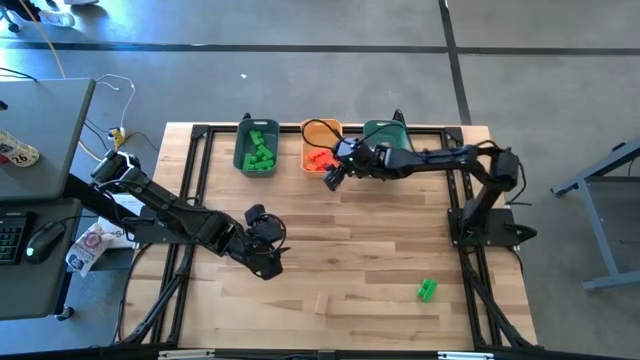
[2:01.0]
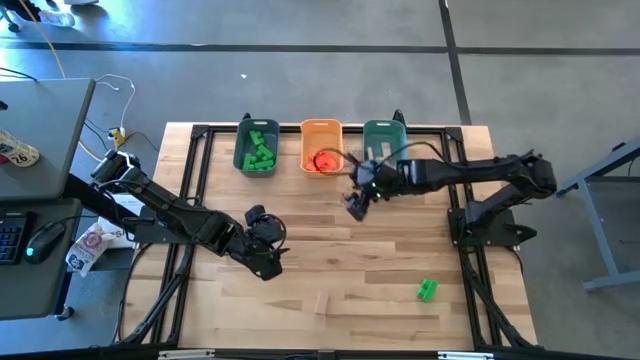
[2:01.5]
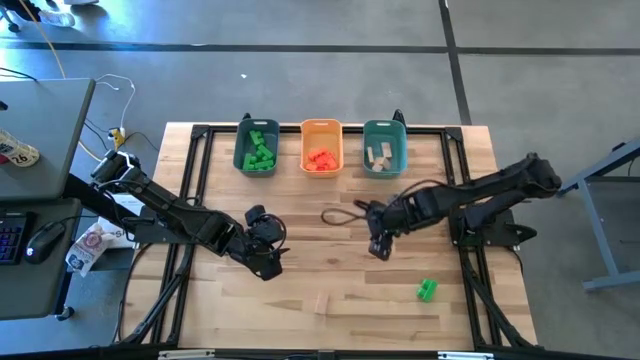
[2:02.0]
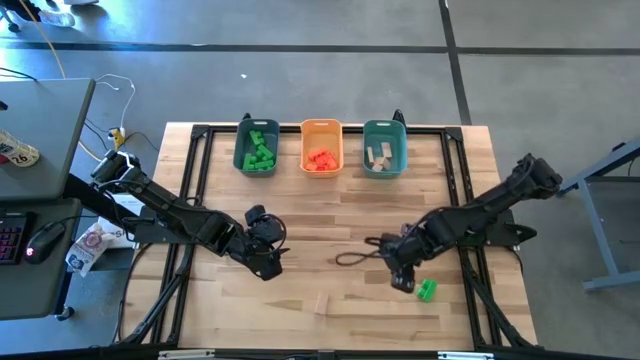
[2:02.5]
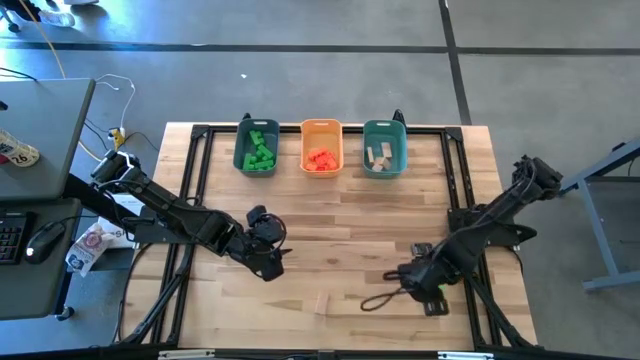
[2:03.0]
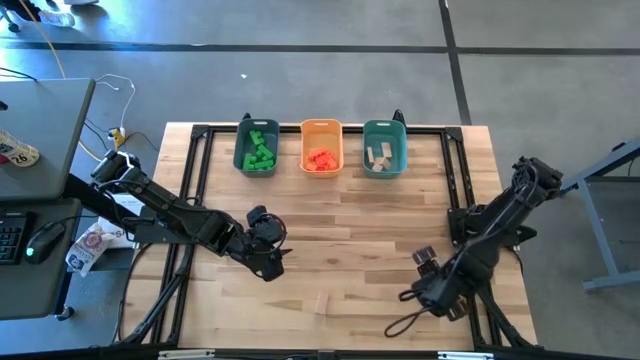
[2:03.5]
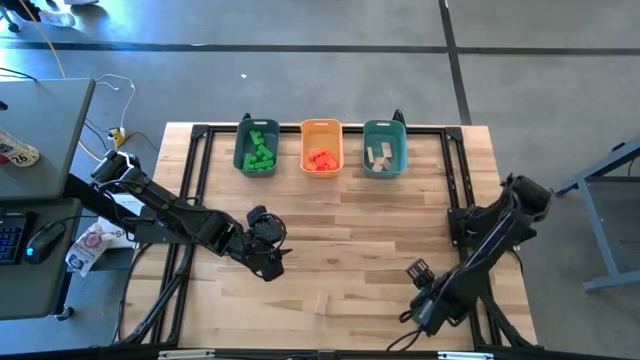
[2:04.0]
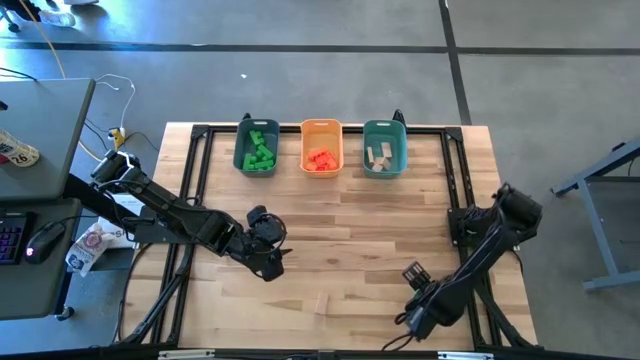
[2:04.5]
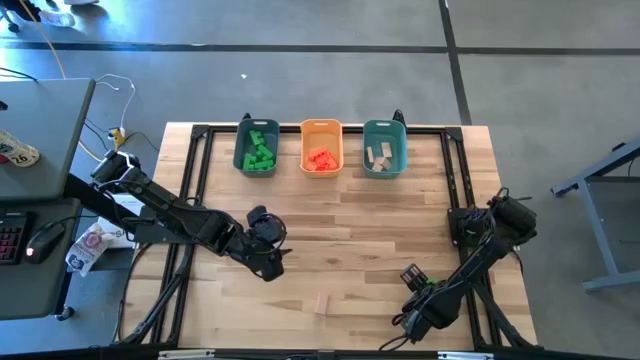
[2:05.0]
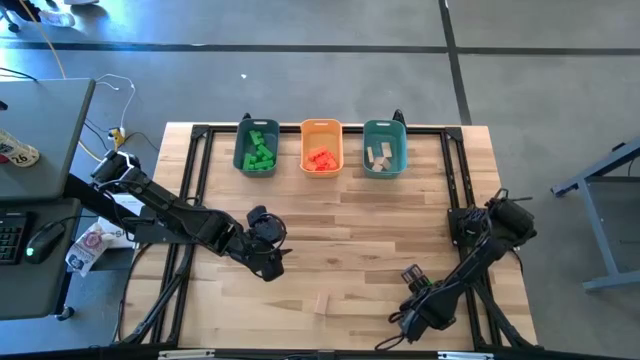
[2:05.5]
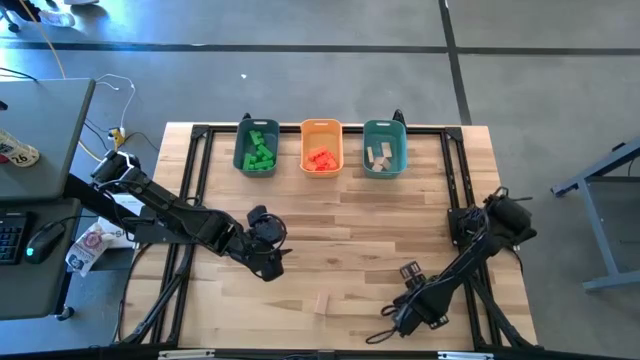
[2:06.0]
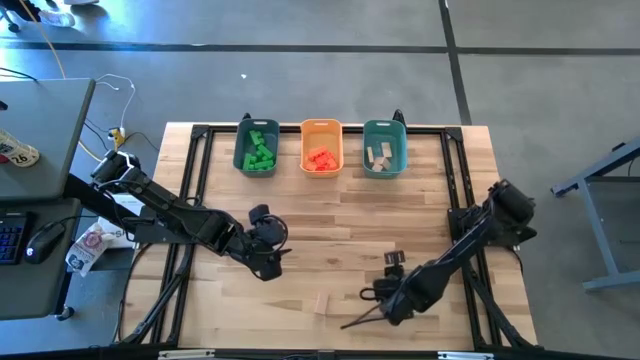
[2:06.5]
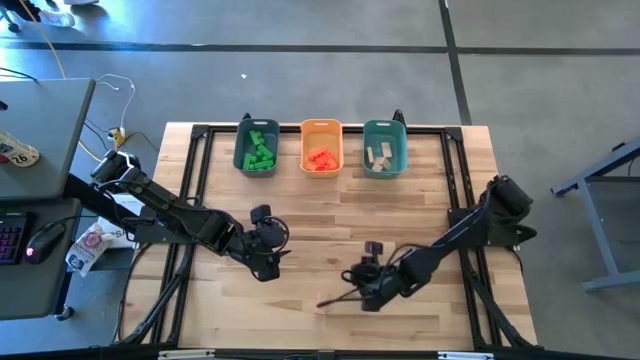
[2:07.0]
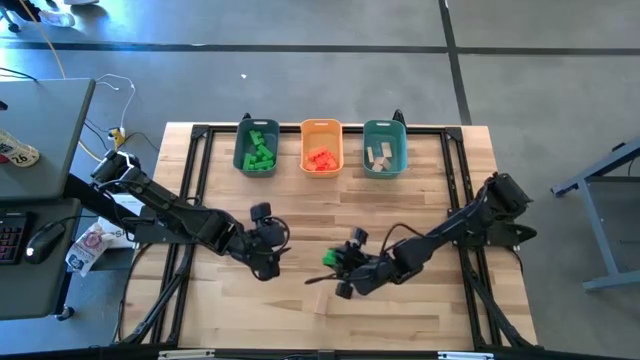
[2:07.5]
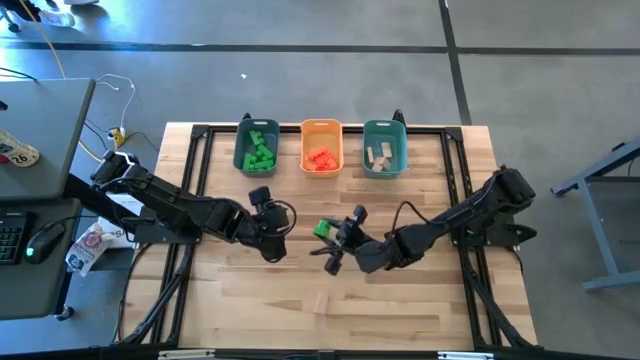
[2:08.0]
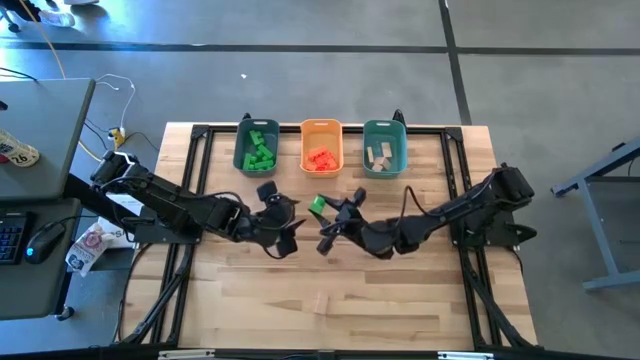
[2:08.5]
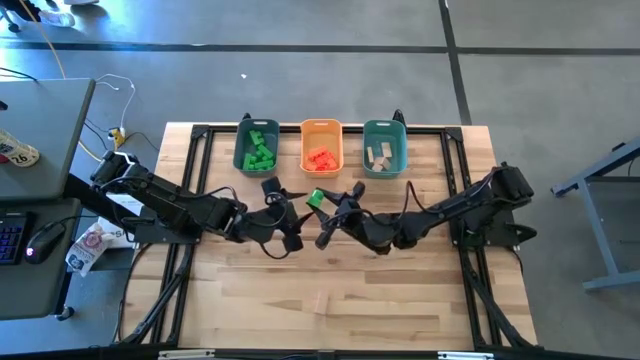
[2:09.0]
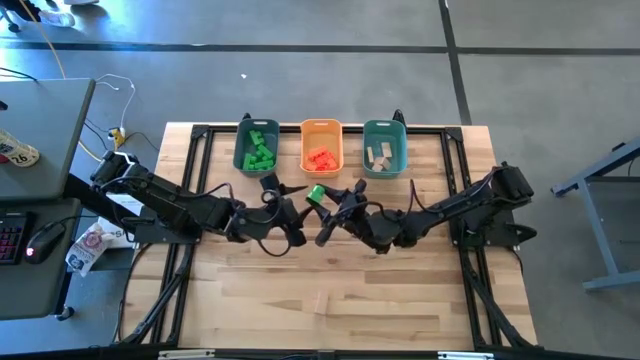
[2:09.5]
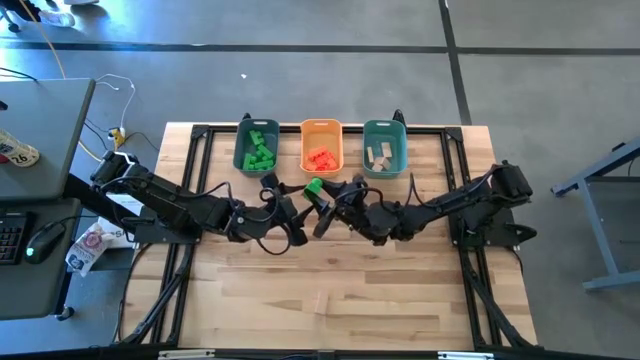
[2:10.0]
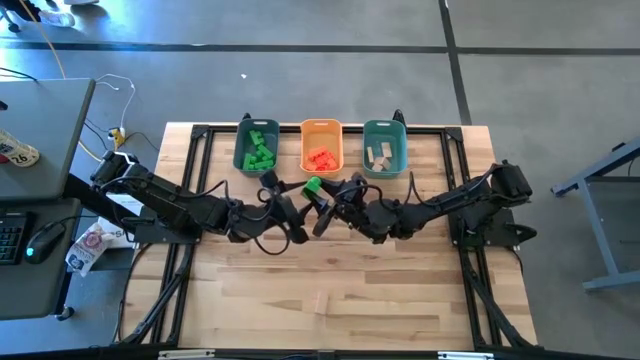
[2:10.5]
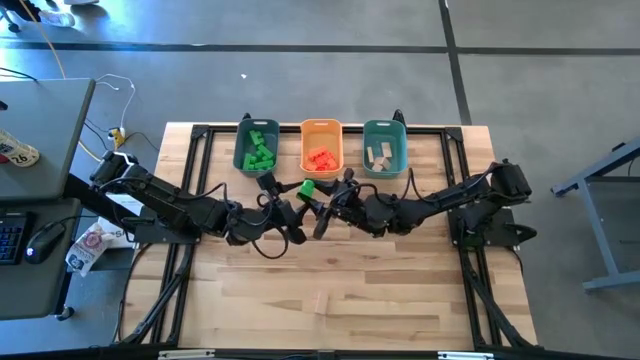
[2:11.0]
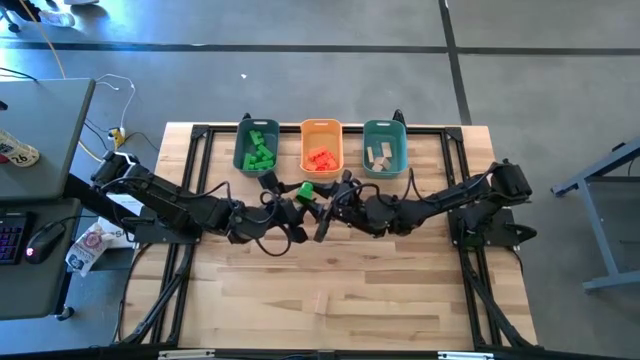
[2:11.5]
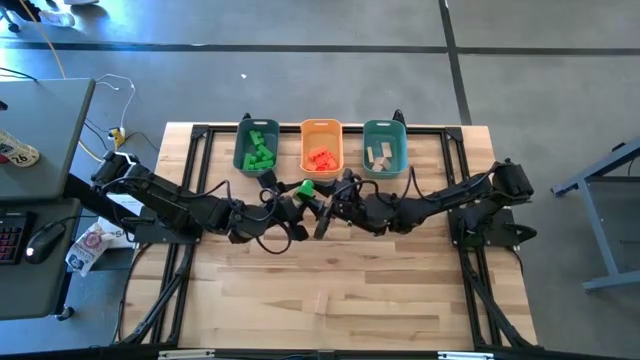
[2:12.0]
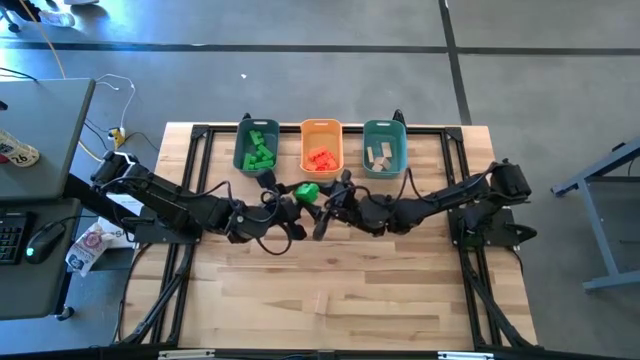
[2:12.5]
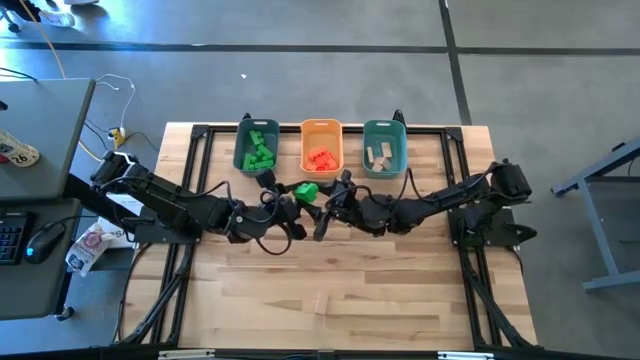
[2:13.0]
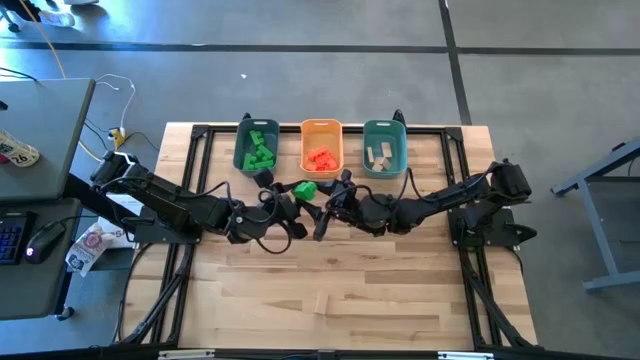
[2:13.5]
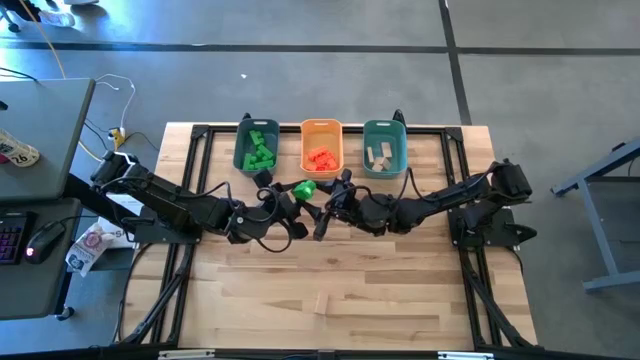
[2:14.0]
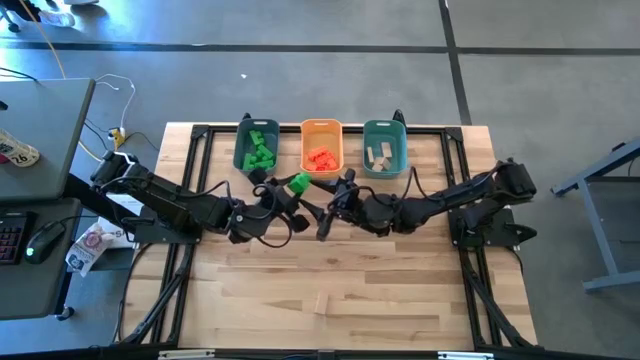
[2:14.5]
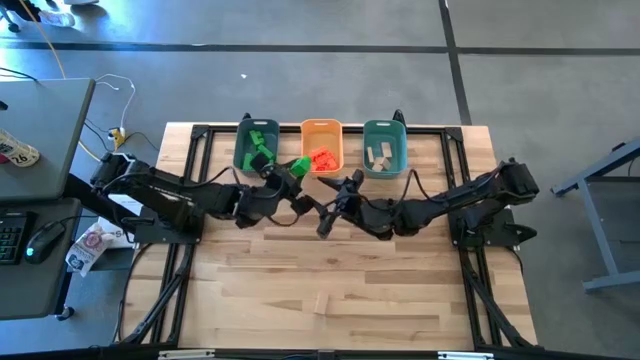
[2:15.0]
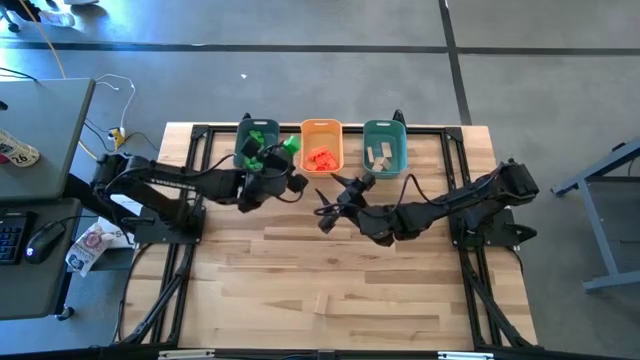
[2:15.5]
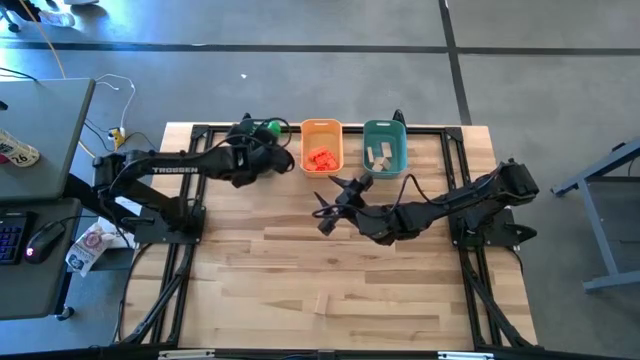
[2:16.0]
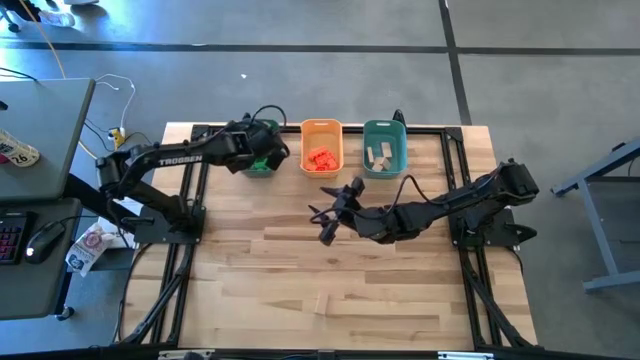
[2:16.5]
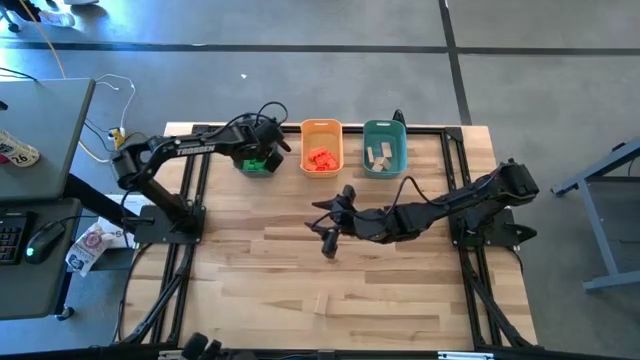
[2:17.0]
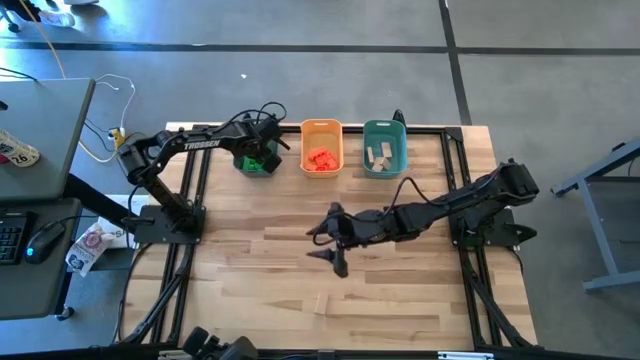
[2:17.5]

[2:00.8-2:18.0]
Task: Sort & place blocks by color
Put the green game piece into the dark blue bin

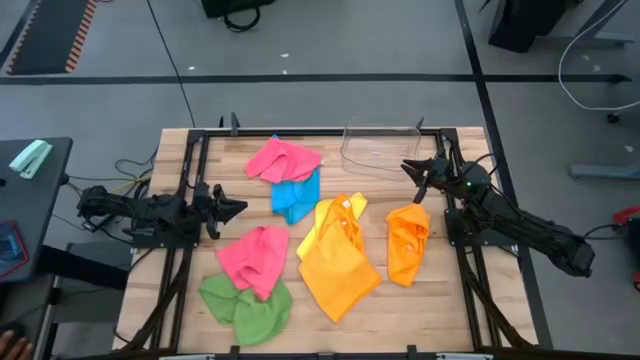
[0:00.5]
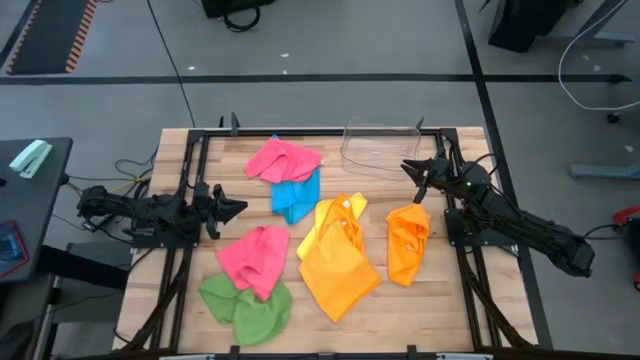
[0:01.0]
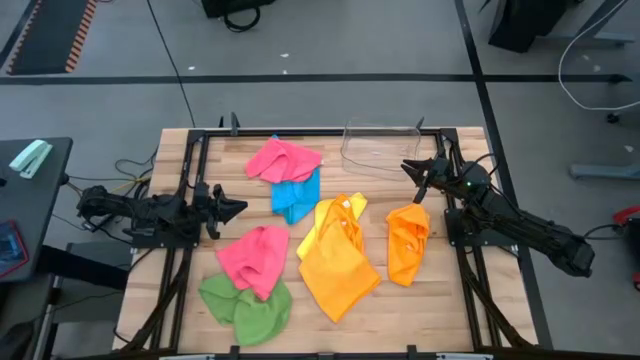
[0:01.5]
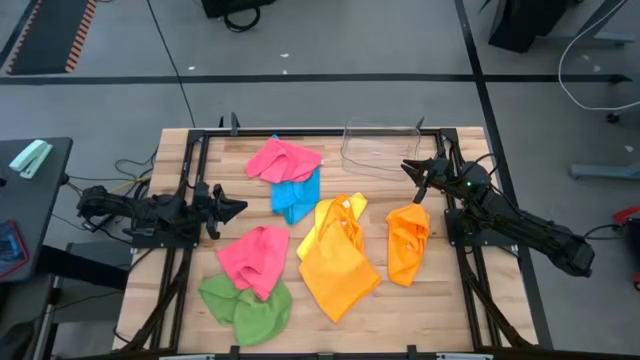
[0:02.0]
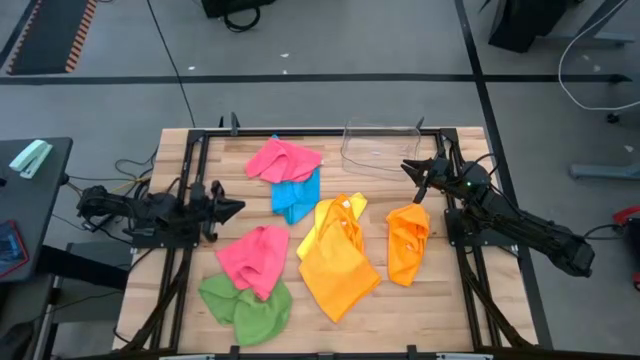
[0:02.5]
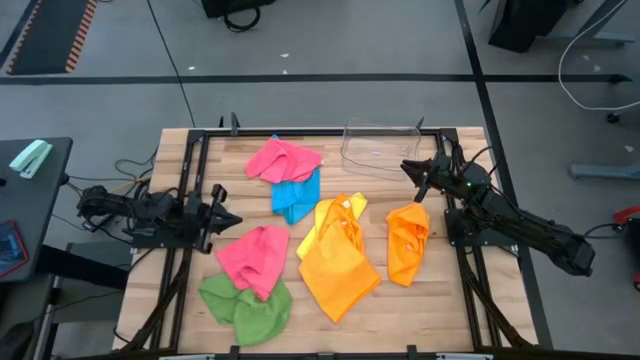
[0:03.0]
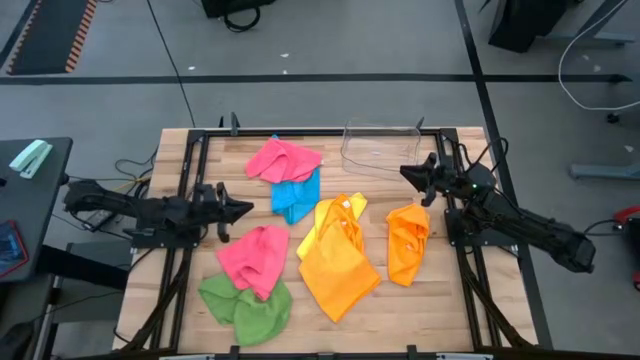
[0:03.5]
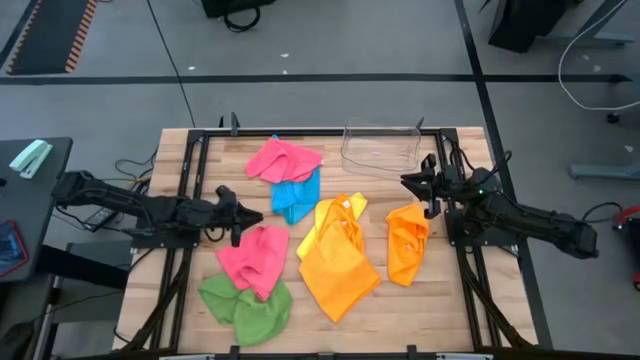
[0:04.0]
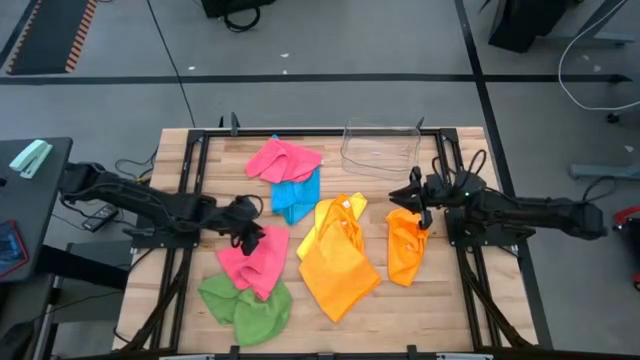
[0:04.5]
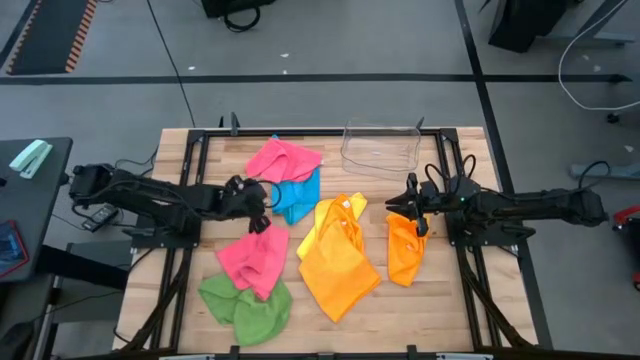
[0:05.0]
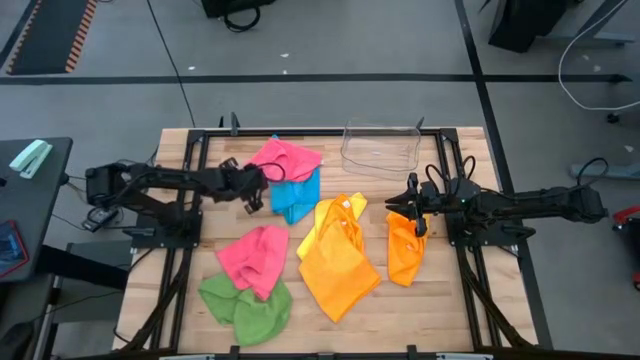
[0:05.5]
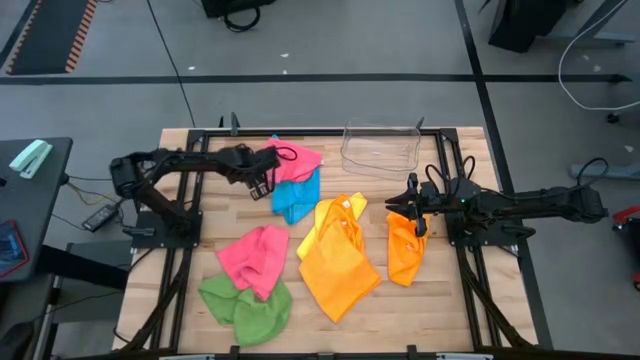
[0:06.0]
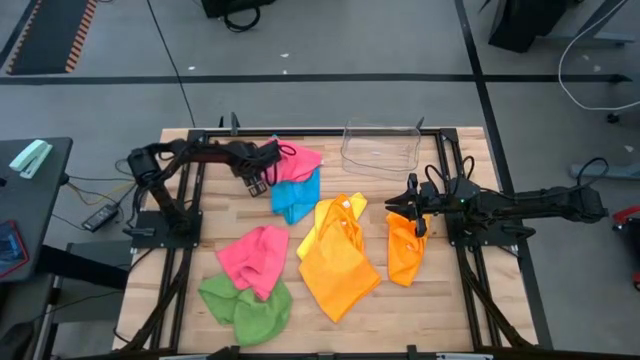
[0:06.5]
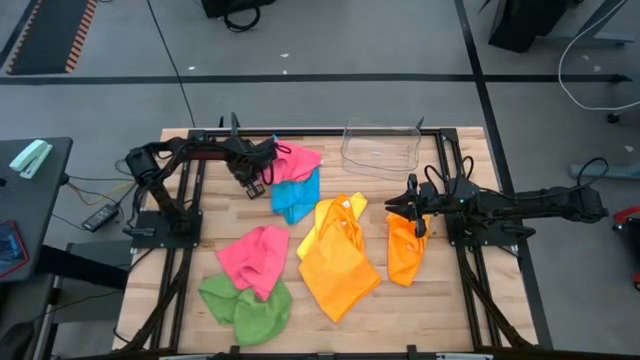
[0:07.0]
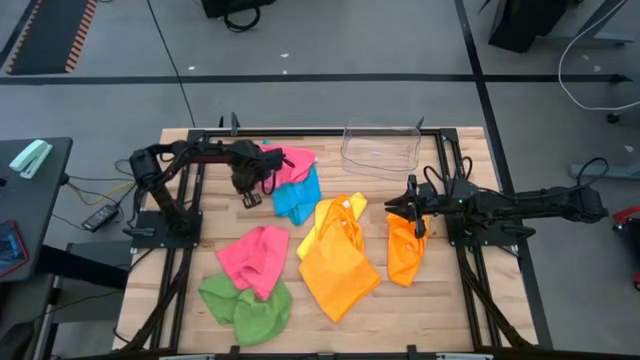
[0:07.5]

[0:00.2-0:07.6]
Task: Fold microfiber towels
Fold the top pink microfiber cloth
